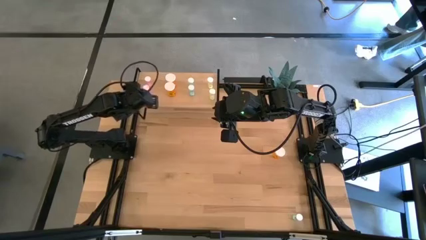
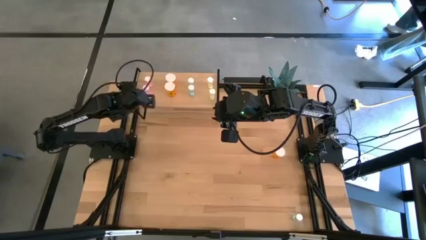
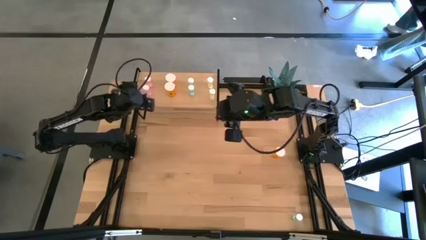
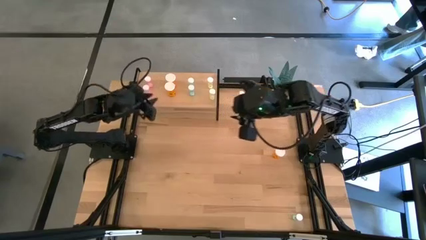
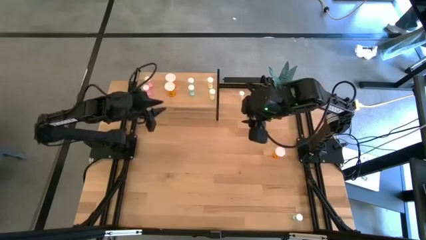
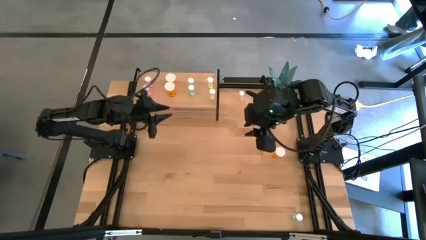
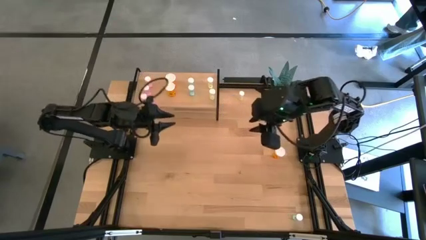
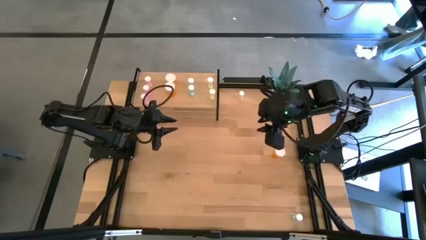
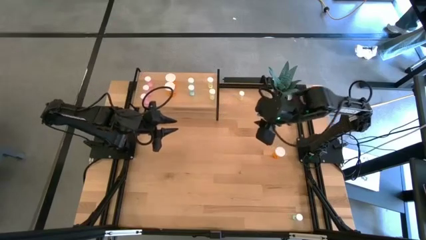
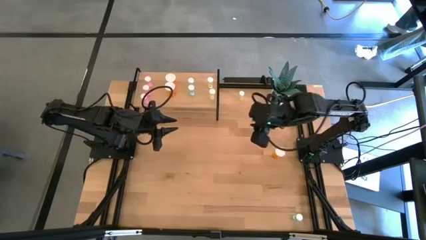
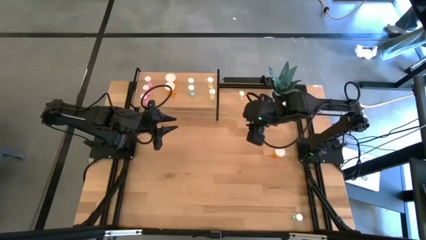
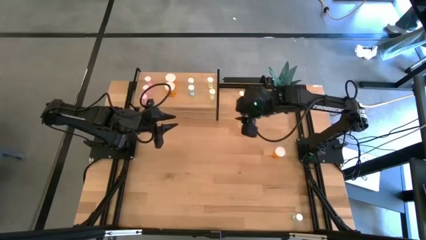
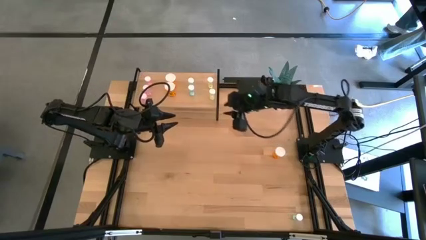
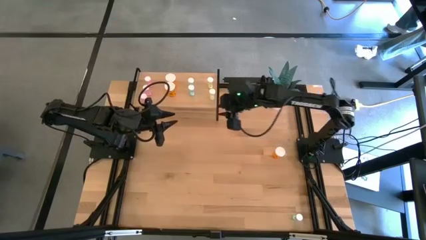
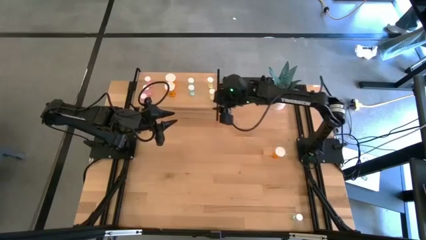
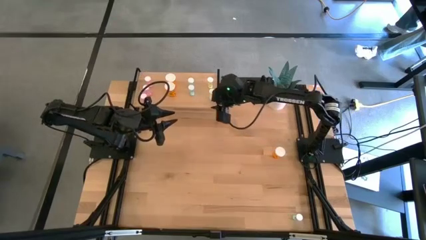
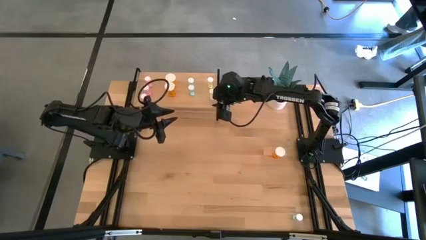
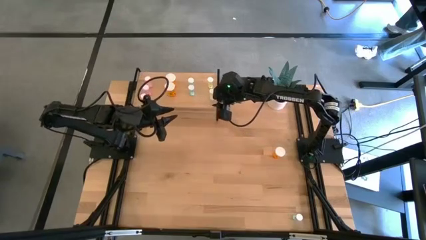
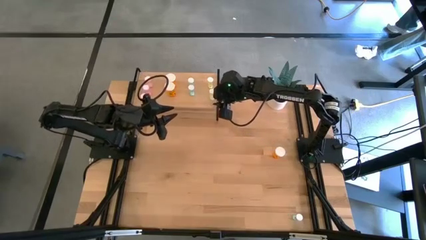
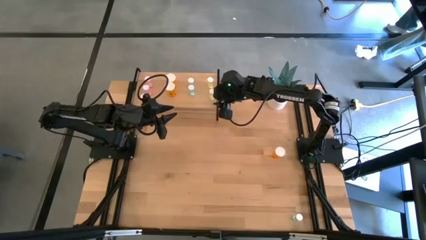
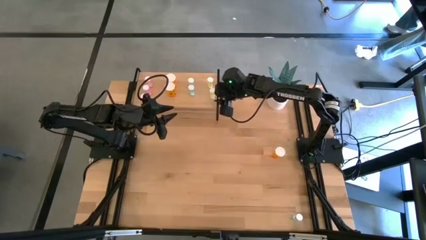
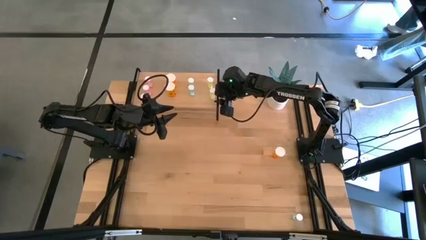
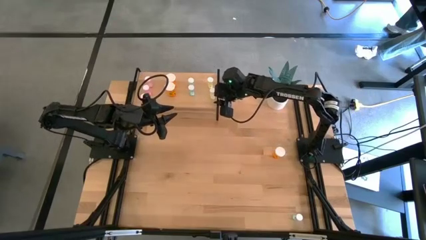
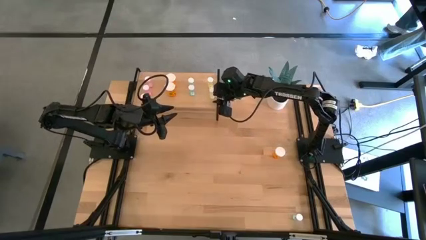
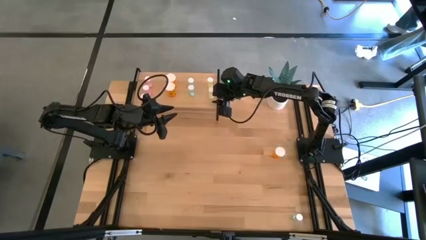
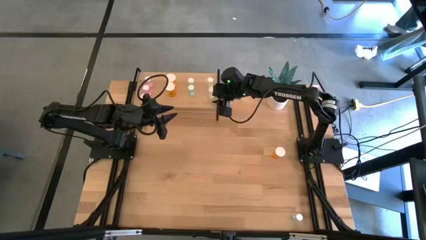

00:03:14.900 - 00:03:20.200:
Task: Pick and place medicine bottles onto shelf by color
Adjust the yellow pill bottle on the shelf

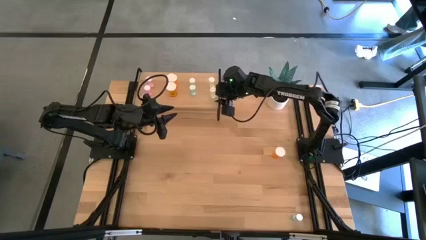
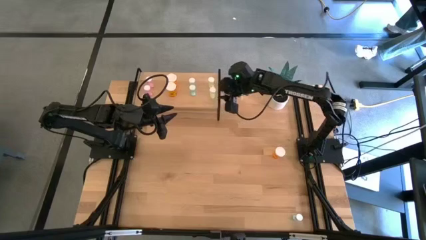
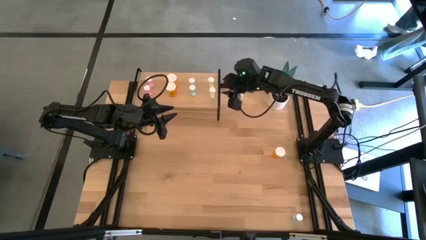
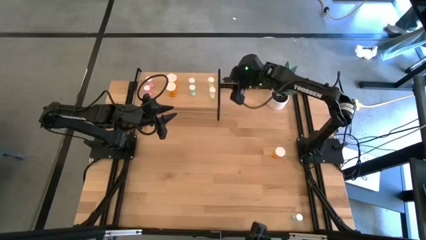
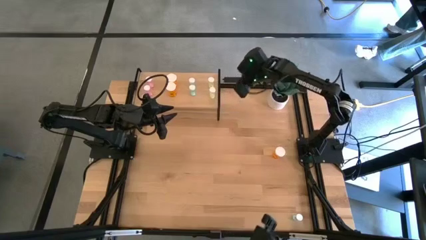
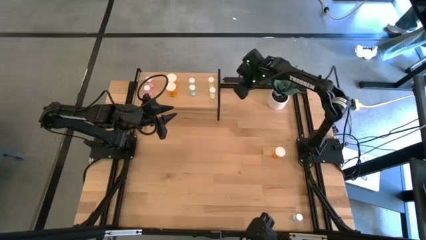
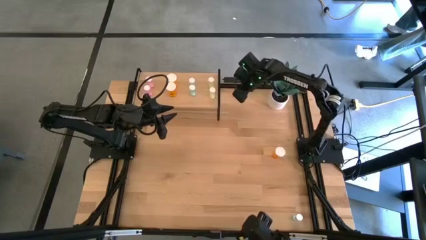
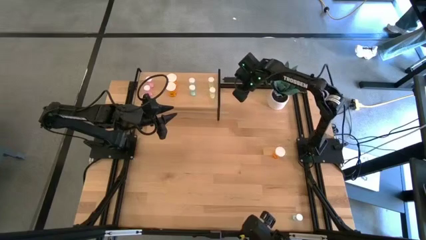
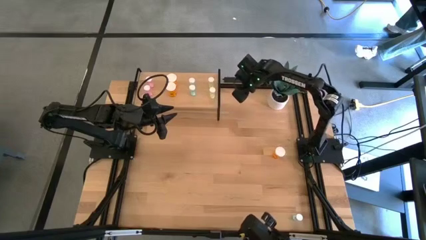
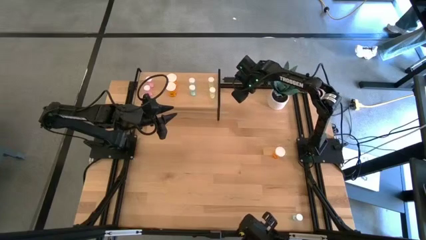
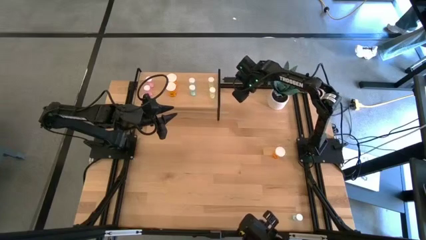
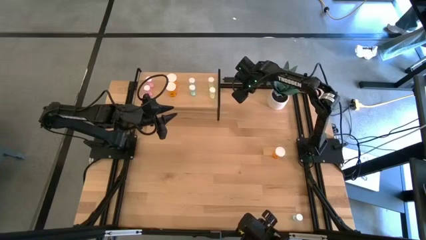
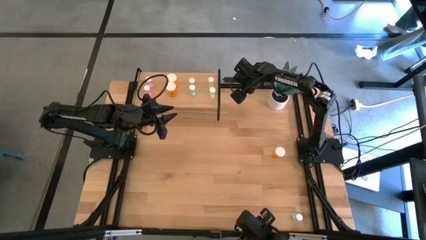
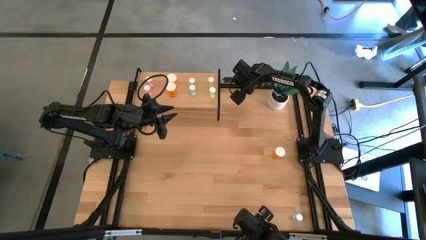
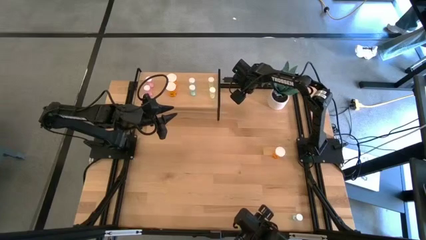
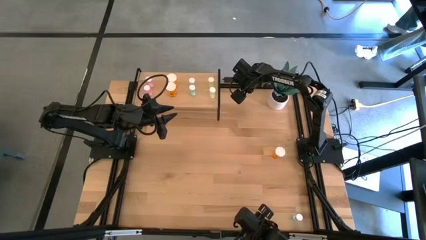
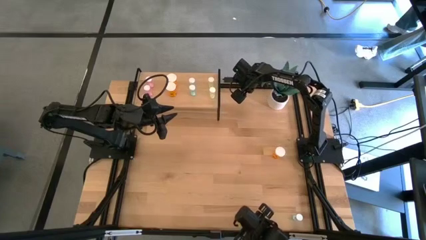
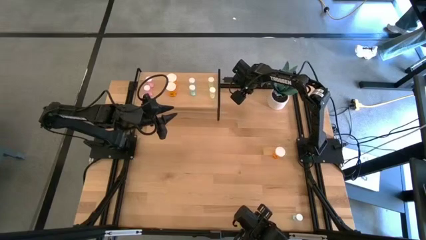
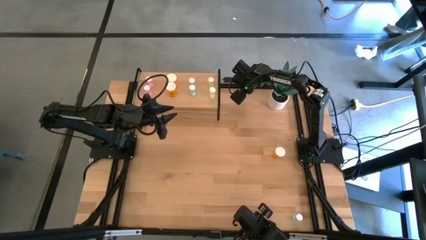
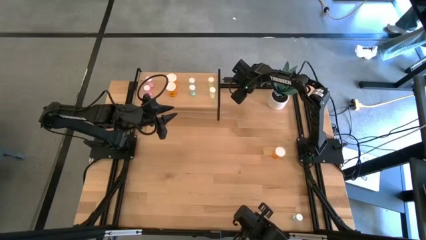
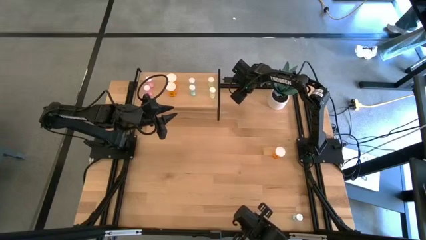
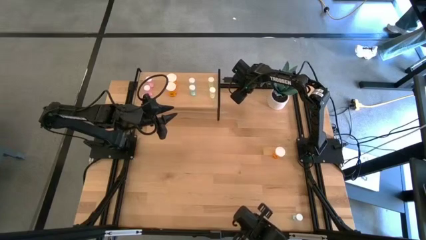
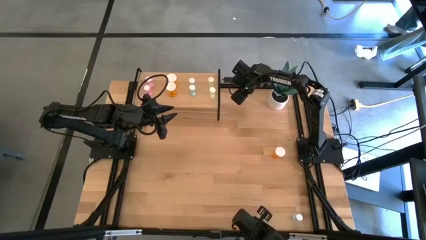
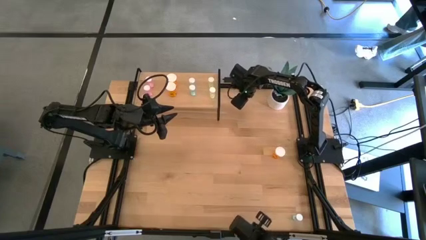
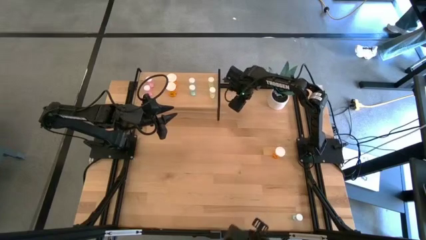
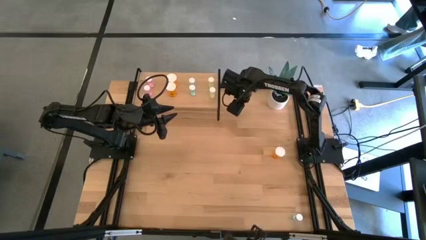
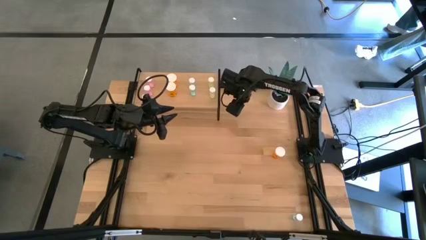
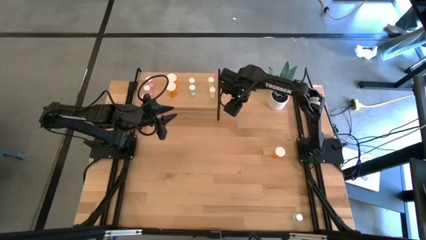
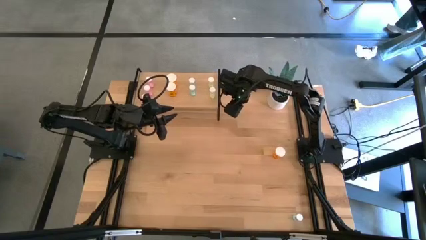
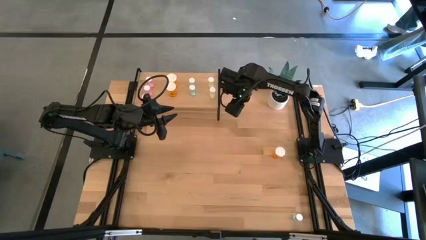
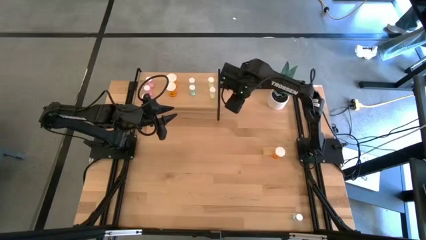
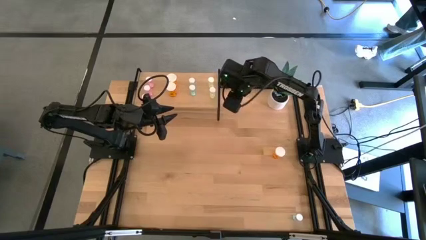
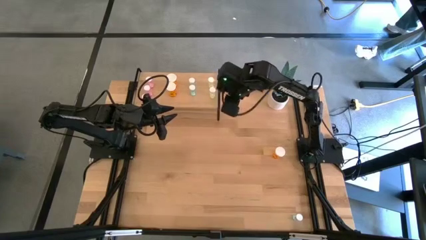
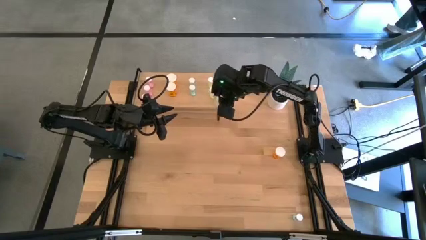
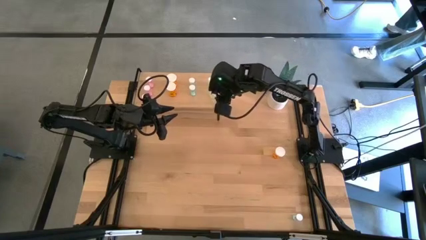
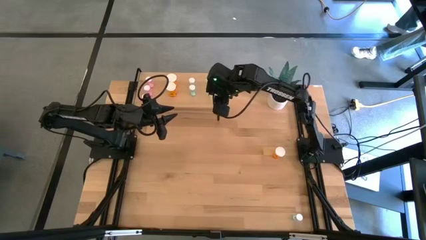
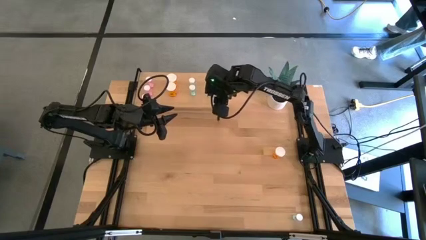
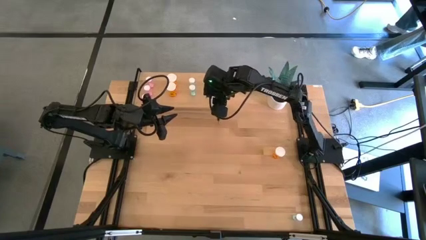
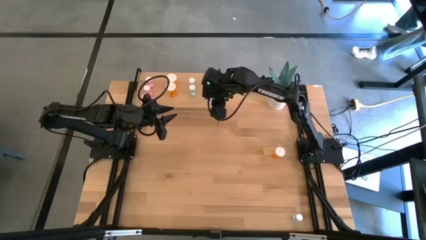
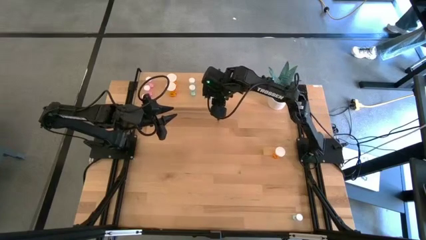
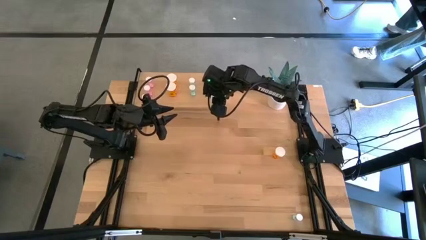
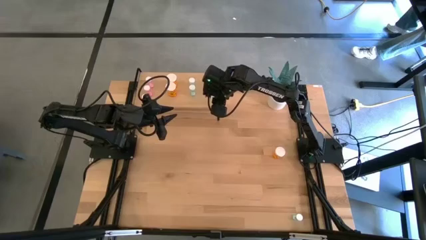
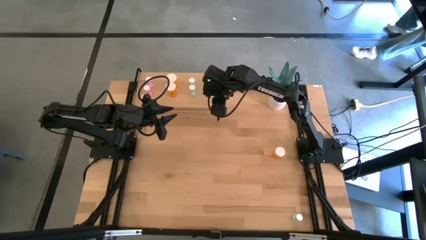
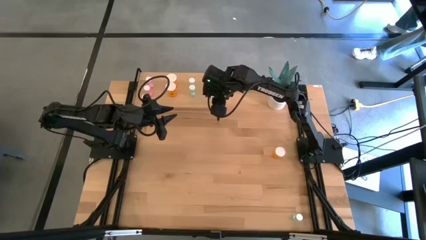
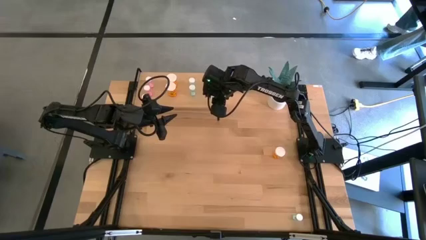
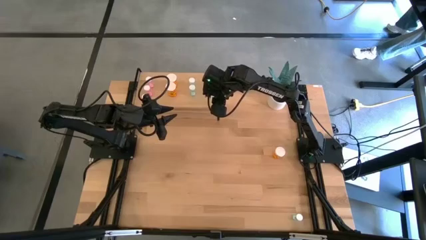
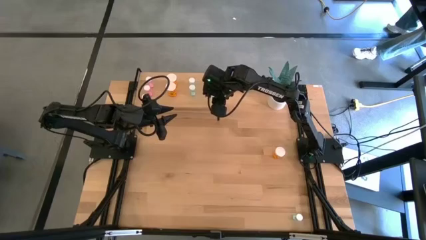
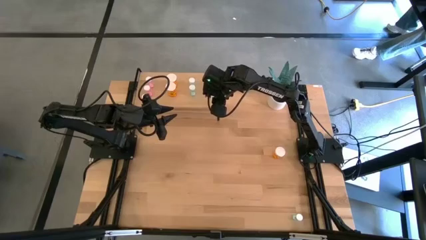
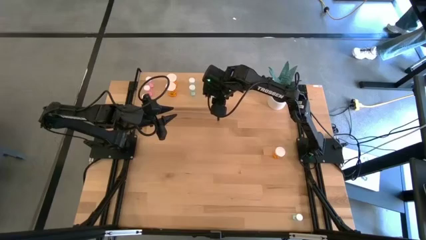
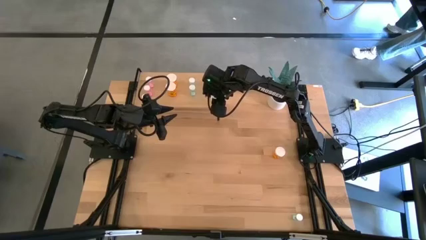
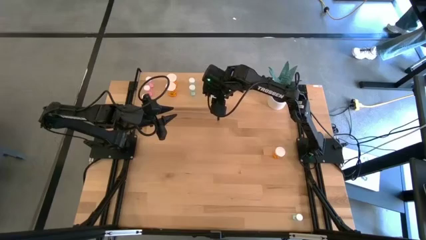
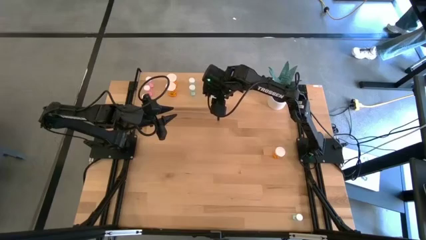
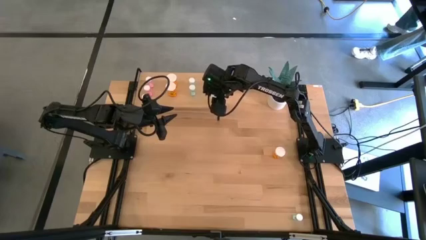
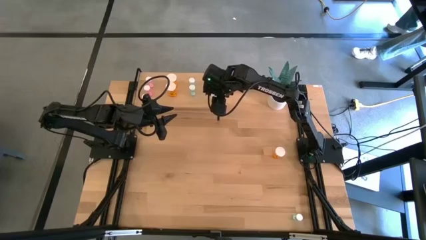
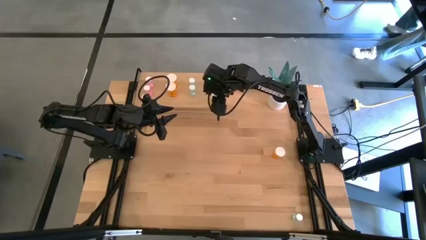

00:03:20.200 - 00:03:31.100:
Put the yellow pill bottle on the shelf aligned with the other yellow pill bottles
